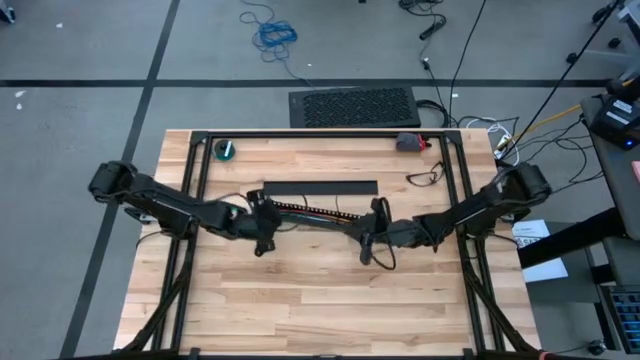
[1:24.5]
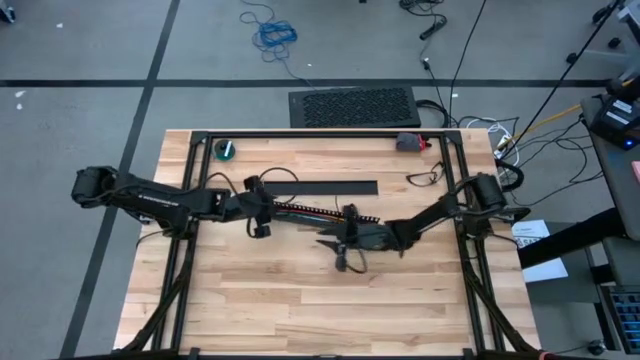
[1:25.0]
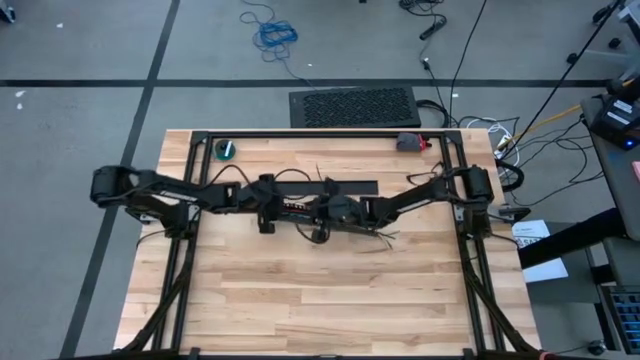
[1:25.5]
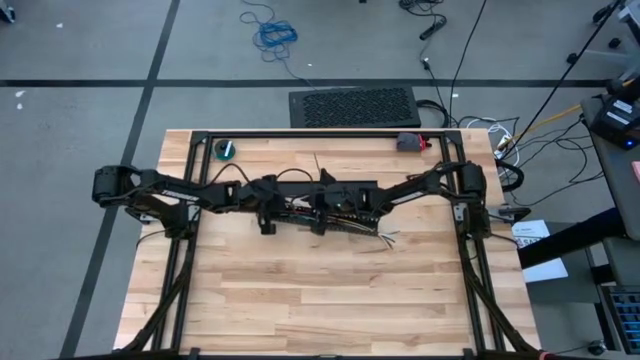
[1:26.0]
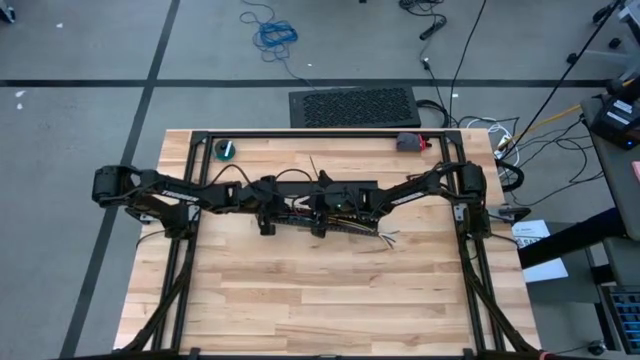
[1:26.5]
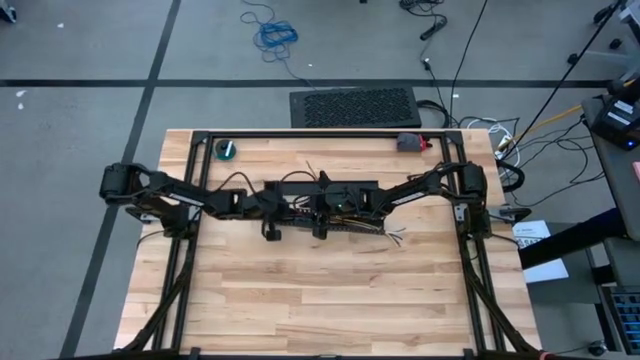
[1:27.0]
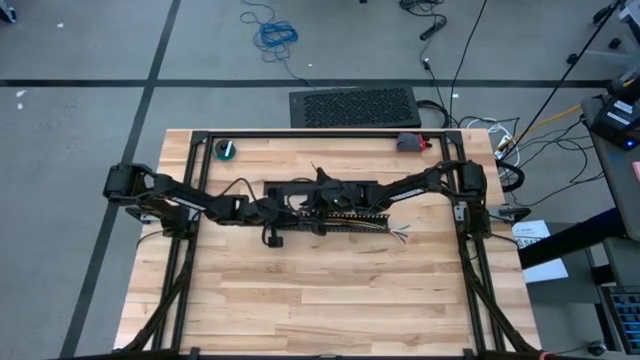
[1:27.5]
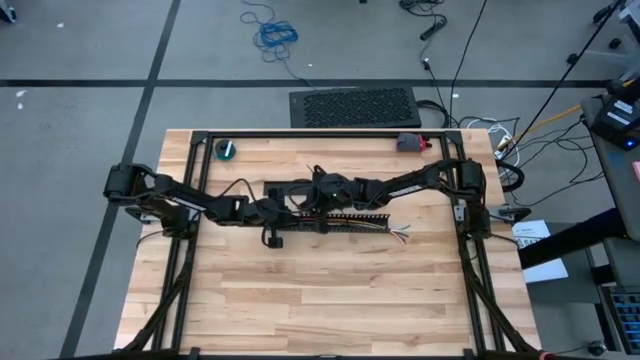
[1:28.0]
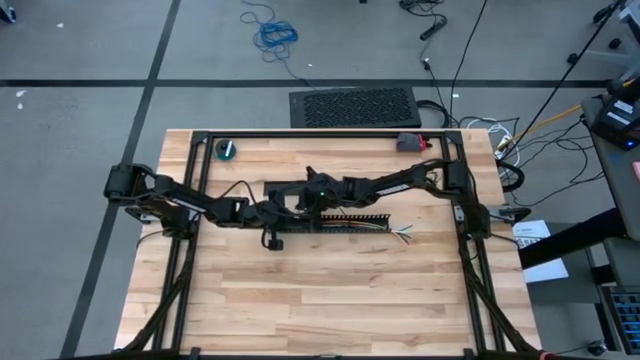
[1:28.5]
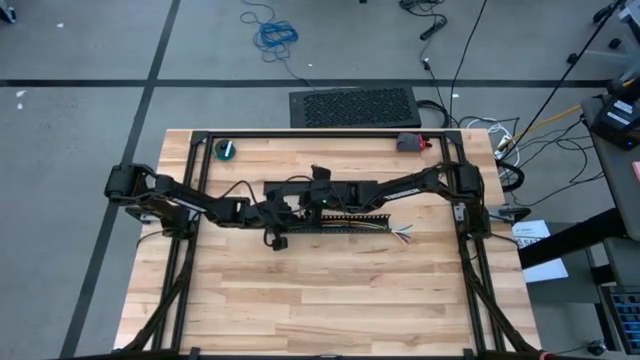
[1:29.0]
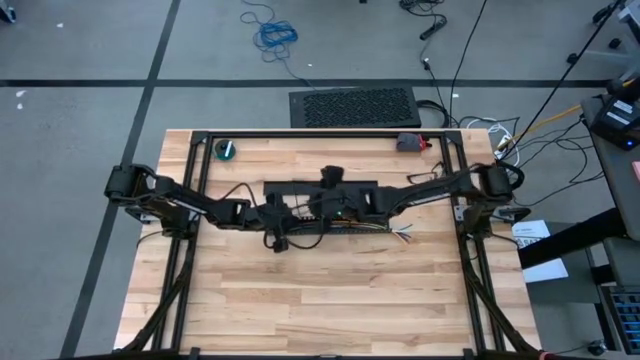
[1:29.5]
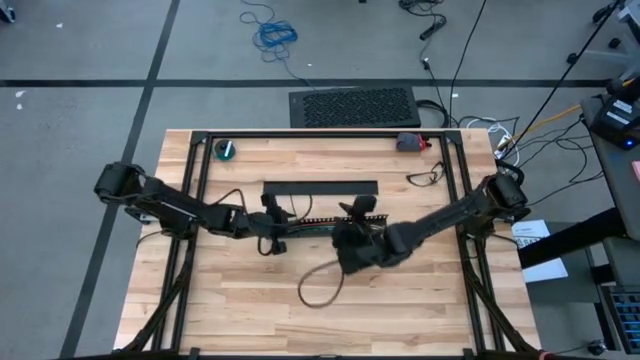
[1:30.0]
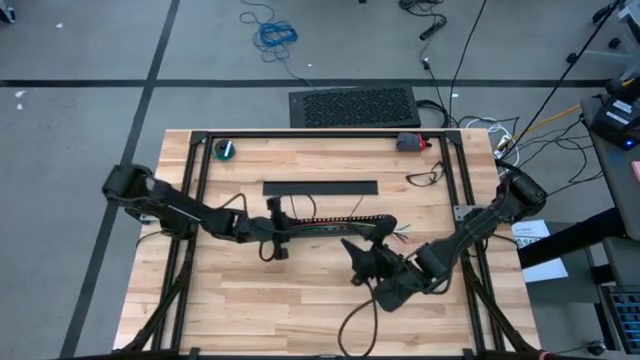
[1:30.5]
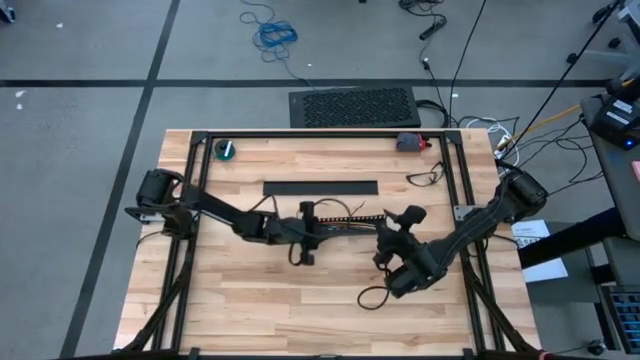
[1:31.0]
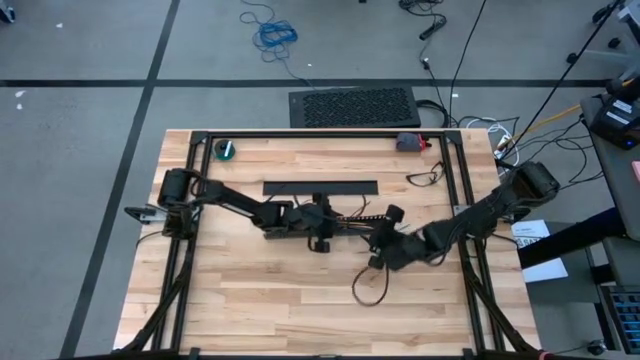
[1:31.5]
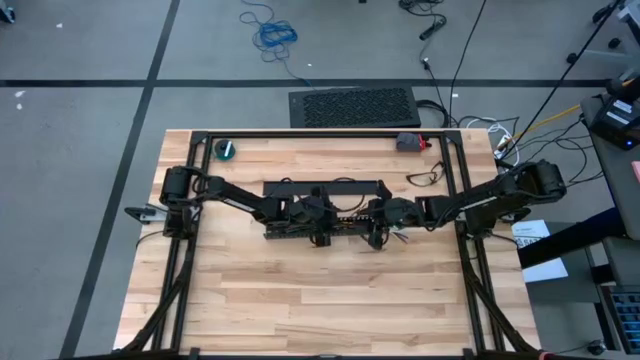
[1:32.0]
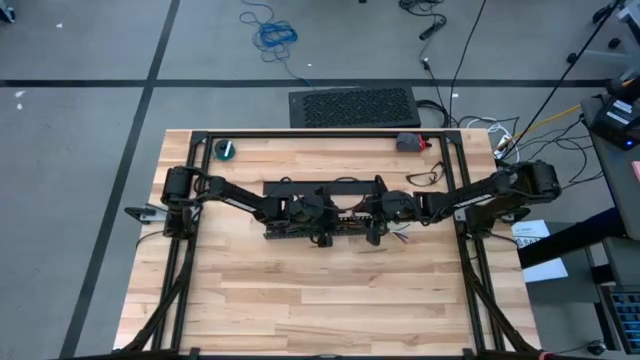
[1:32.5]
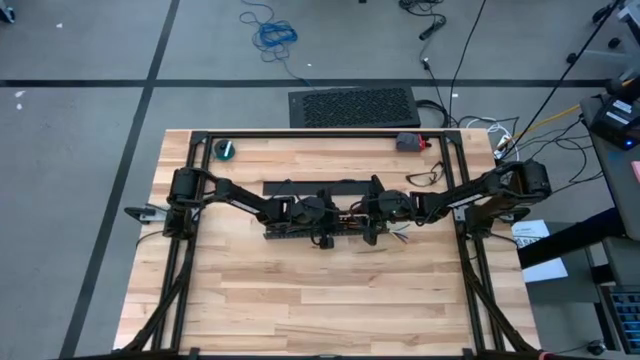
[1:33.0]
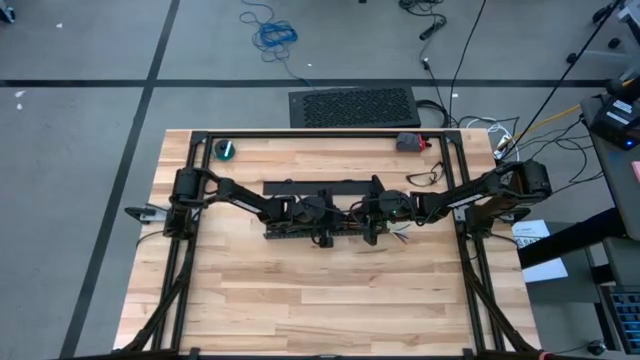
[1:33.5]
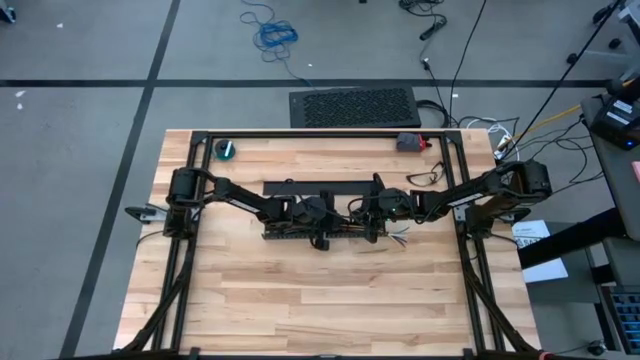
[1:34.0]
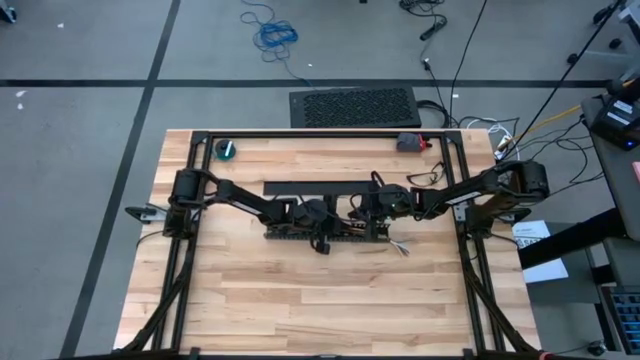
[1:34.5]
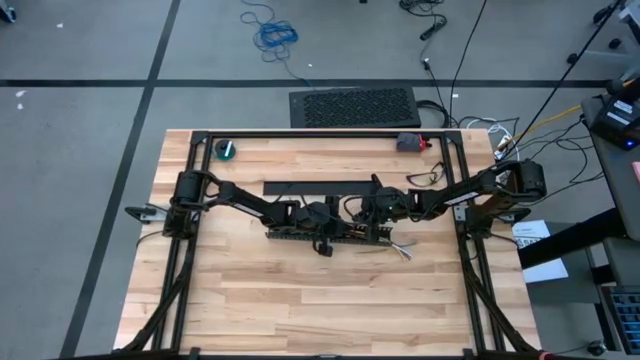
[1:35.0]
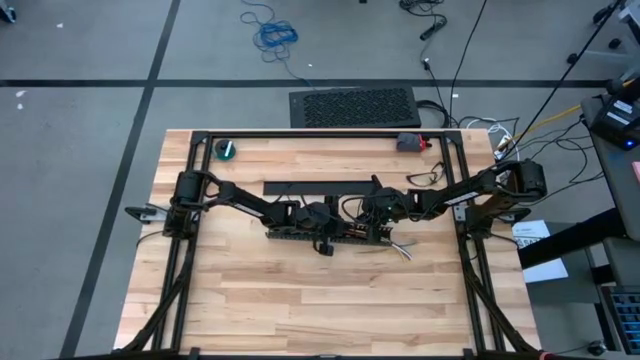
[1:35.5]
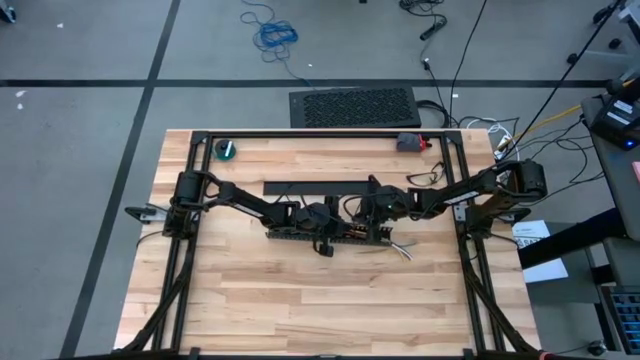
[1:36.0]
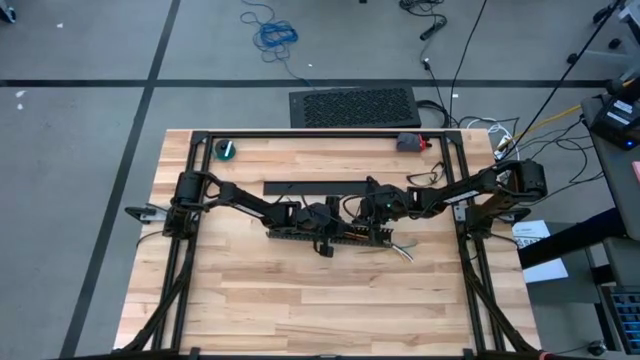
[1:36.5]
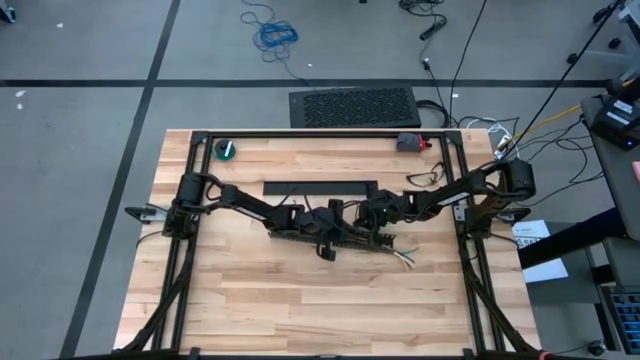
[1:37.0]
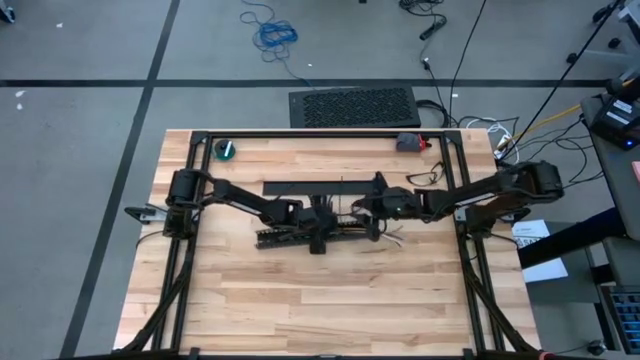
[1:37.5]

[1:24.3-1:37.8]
Task: Ziptie cables
Put zip-tied cables in cable duct
